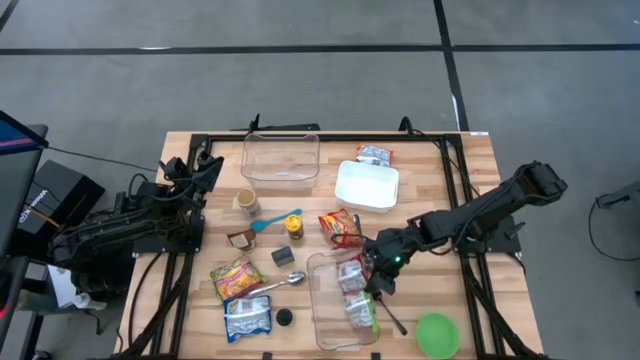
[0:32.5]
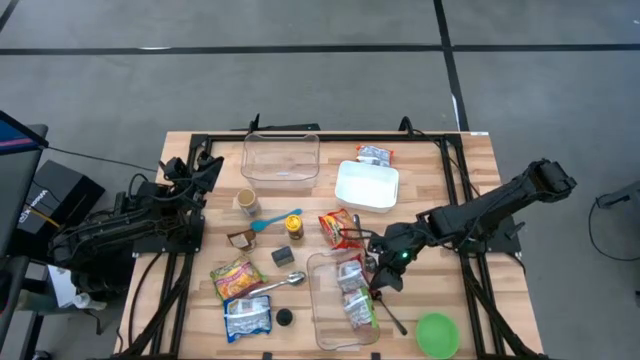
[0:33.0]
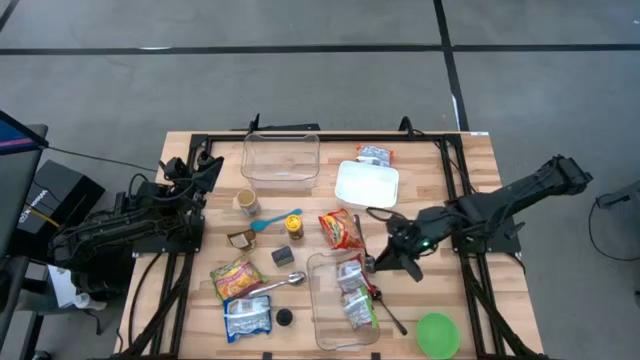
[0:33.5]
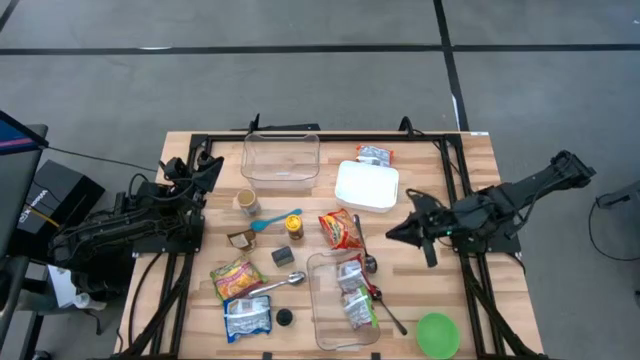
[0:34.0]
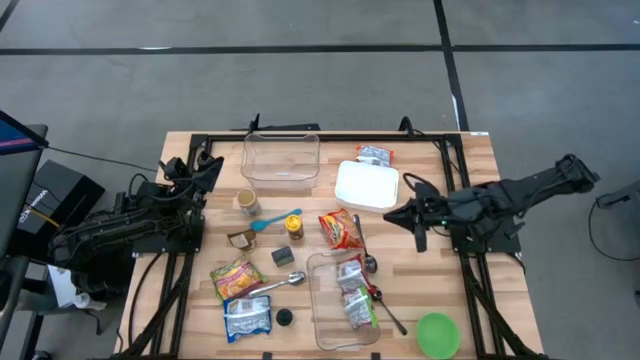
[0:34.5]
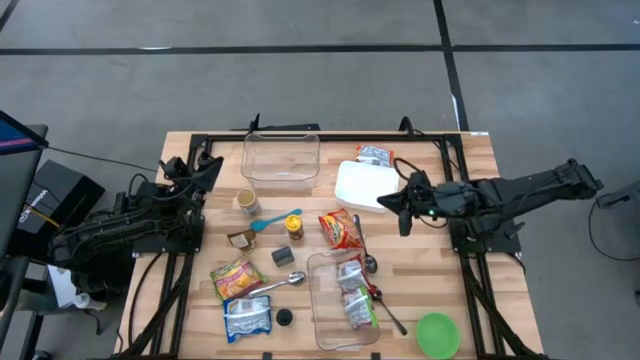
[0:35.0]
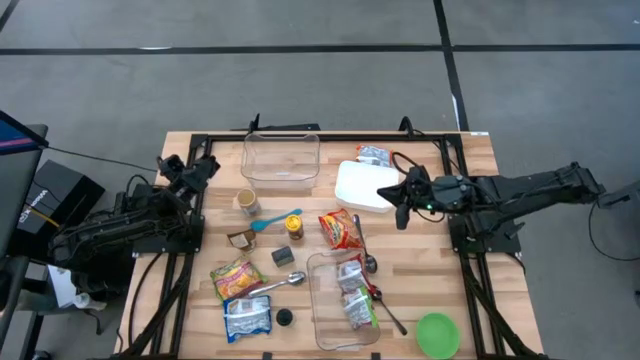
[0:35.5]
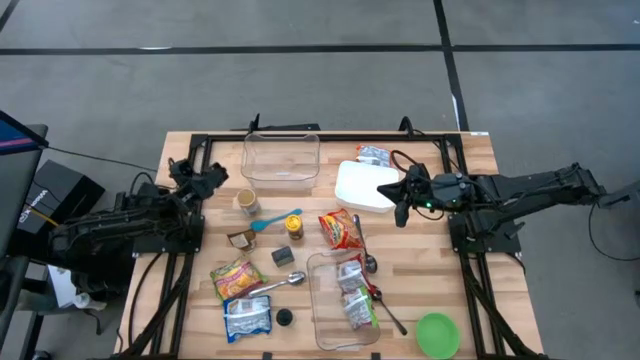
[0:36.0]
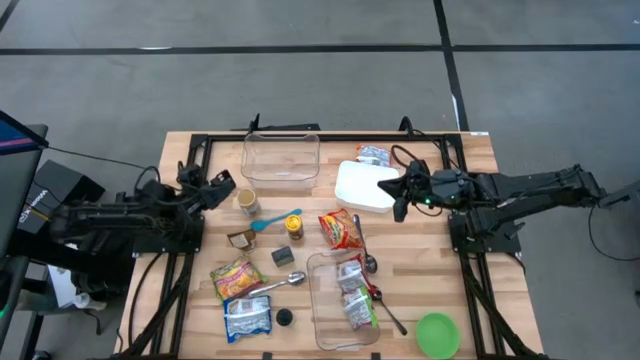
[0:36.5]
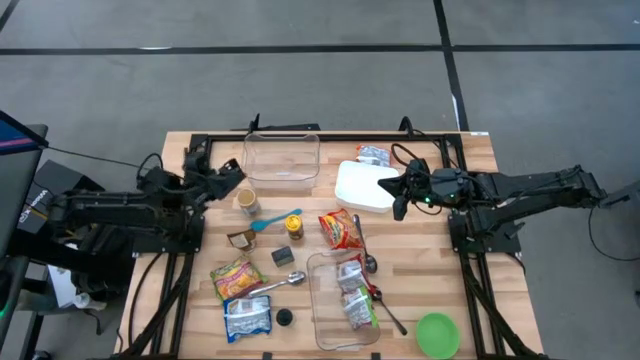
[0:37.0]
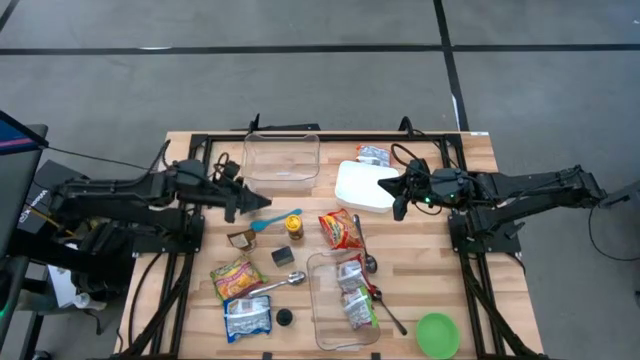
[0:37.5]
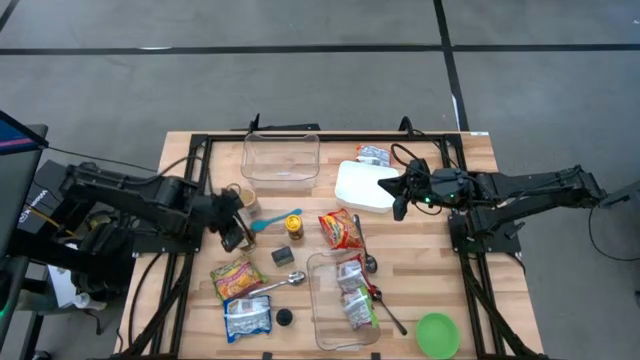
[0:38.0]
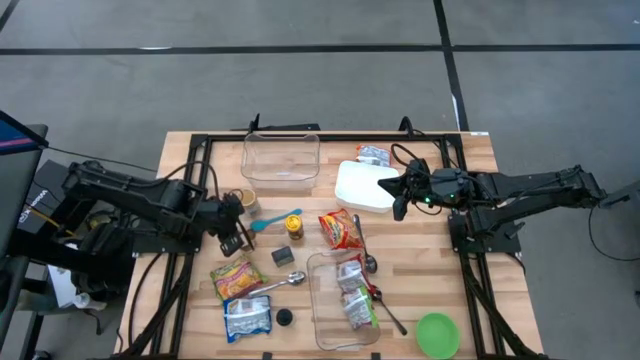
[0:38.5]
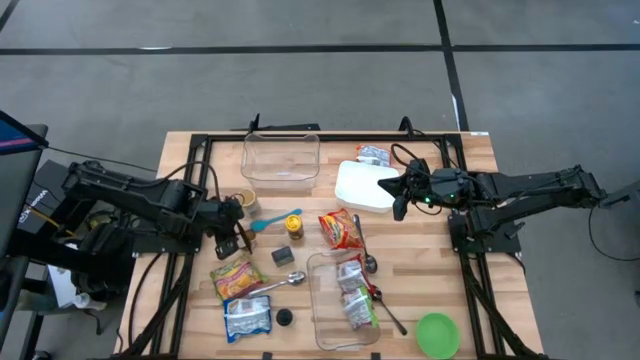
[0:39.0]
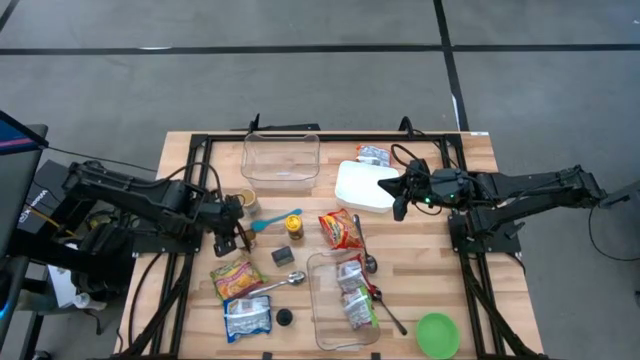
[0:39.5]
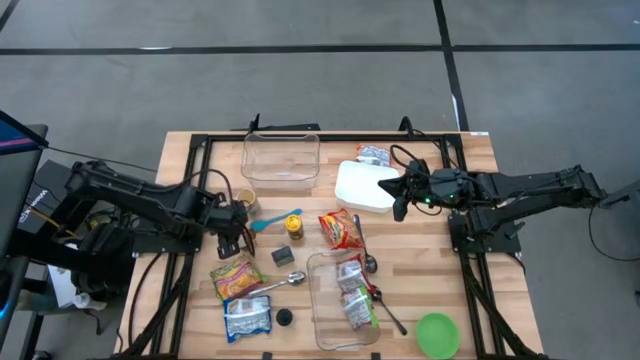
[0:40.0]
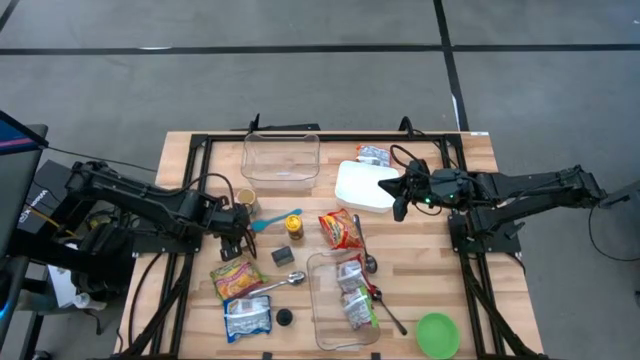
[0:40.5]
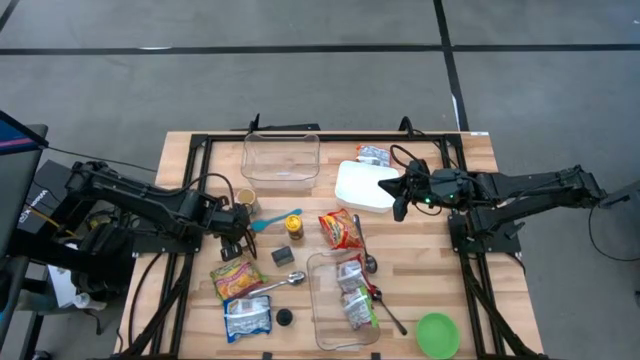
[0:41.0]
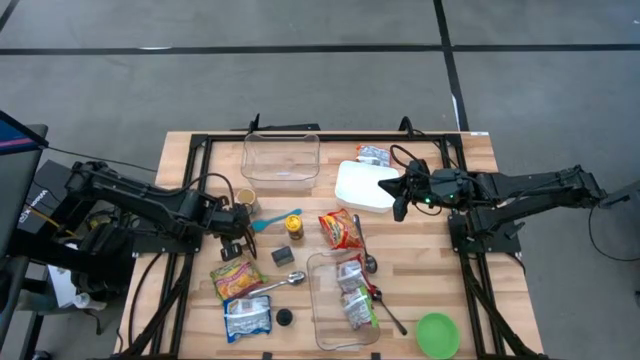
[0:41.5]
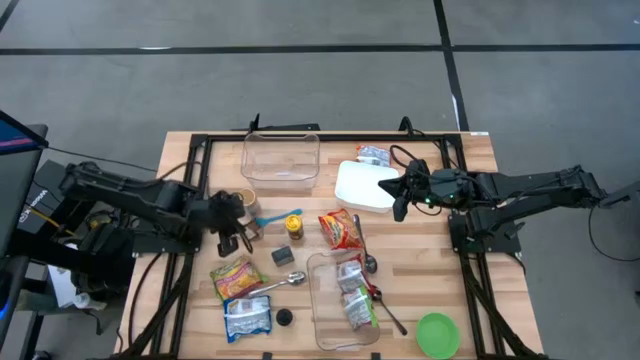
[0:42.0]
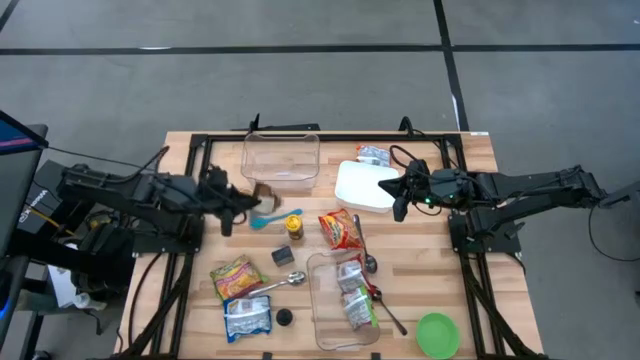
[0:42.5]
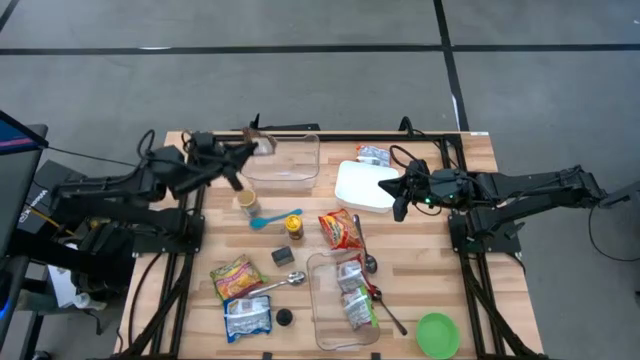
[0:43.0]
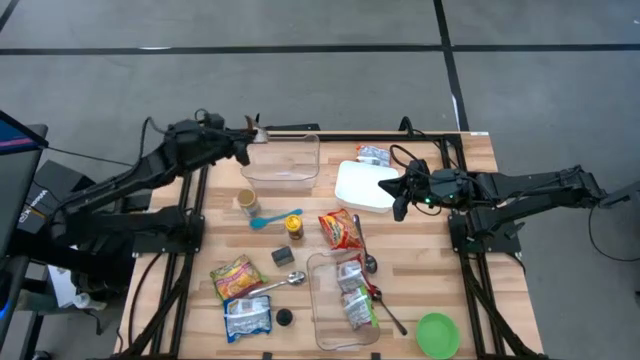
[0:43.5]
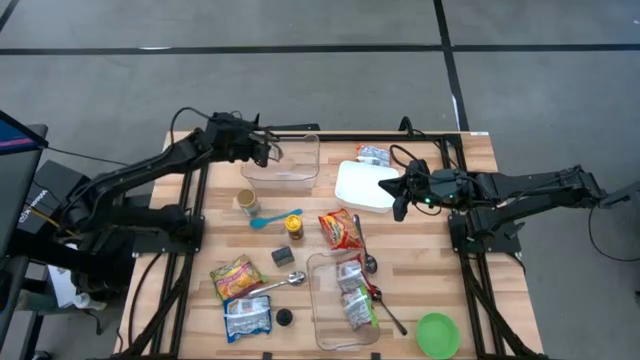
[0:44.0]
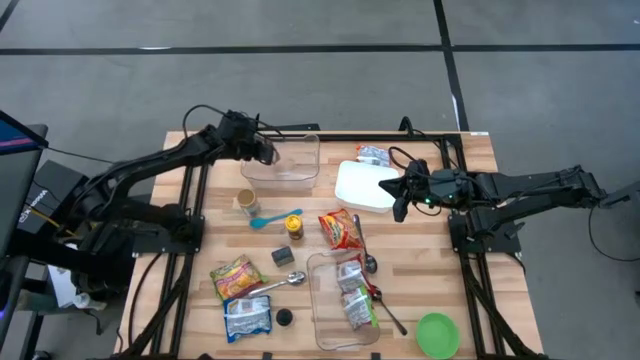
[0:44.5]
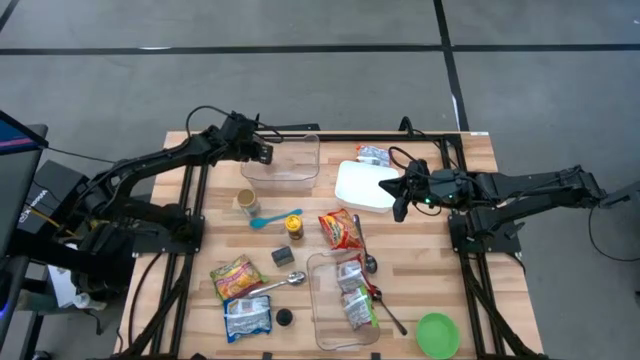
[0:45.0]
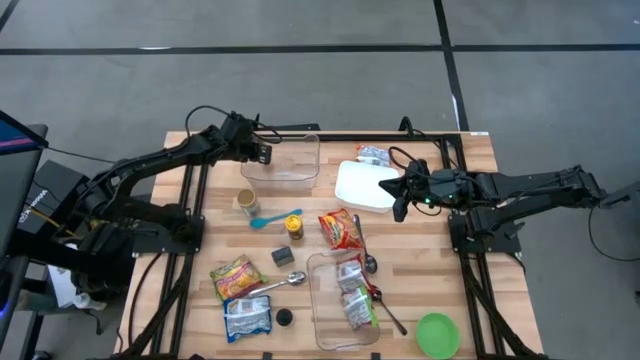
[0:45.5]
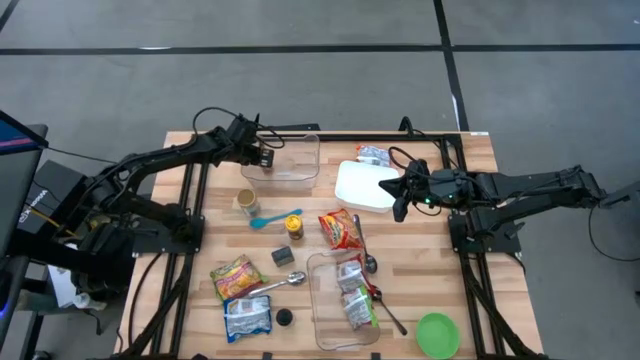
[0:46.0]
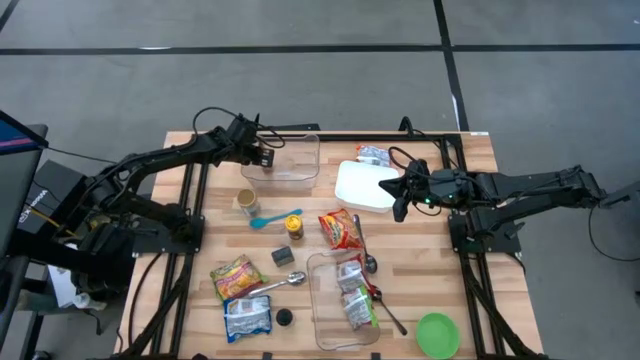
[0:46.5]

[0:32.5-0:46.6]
Task: Pick & Place Food Item
Put the orange seasoning pack into the top transparent bin

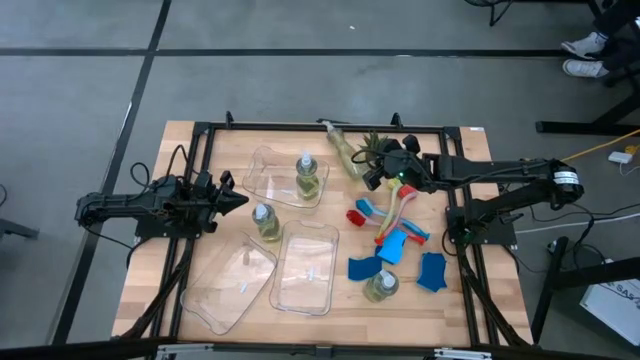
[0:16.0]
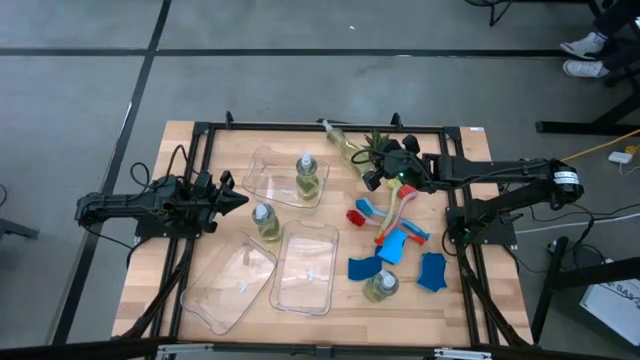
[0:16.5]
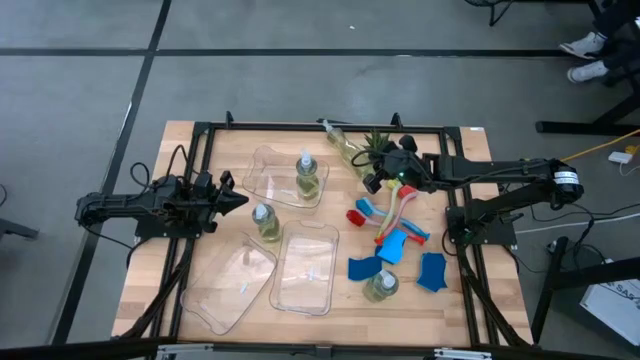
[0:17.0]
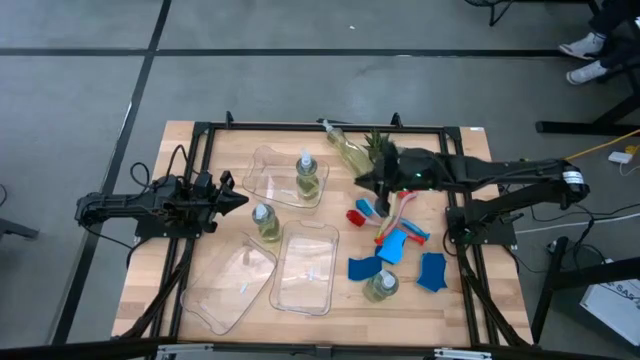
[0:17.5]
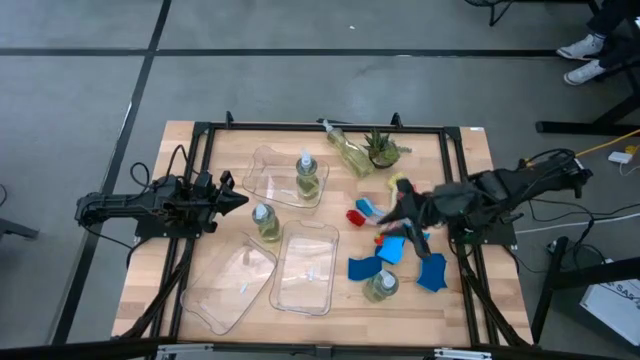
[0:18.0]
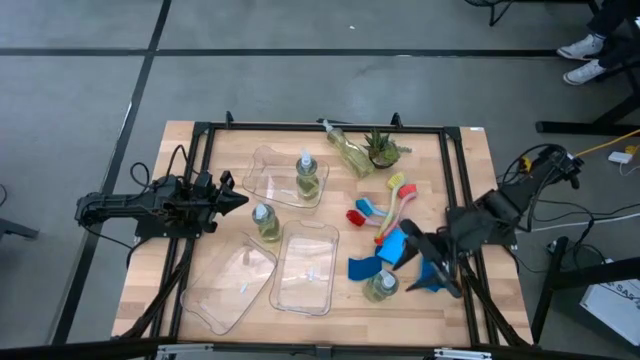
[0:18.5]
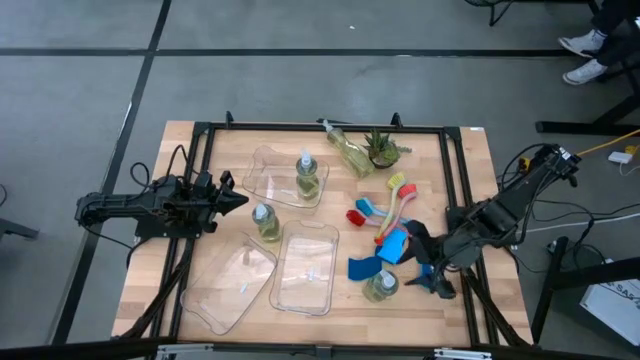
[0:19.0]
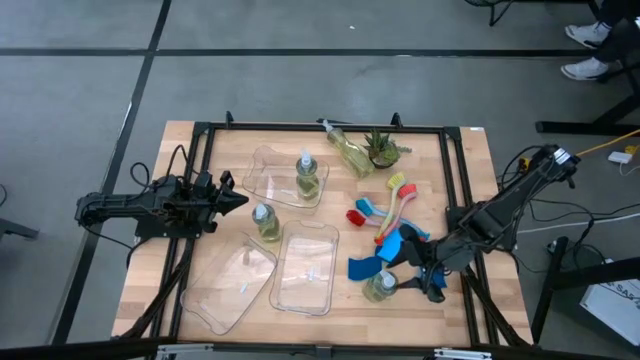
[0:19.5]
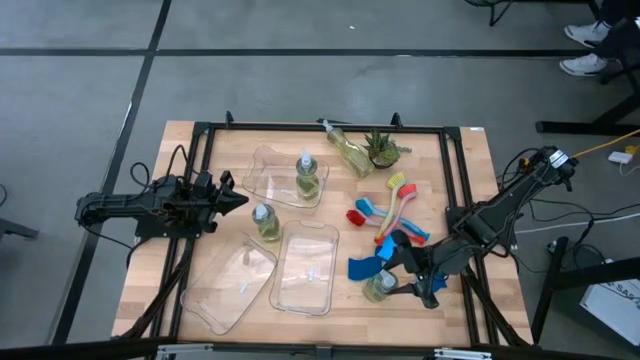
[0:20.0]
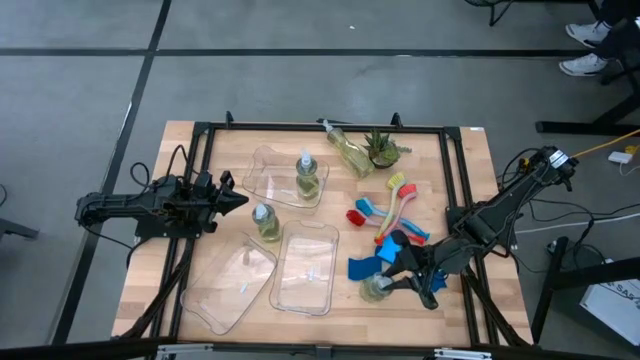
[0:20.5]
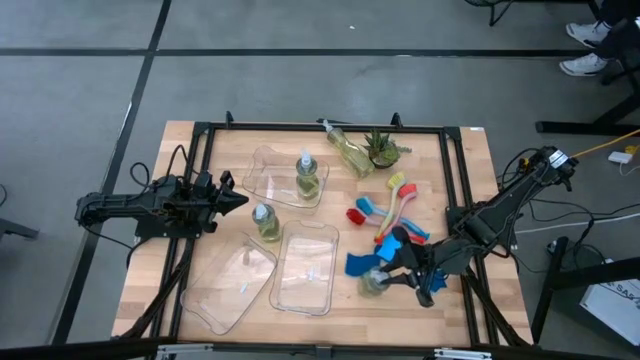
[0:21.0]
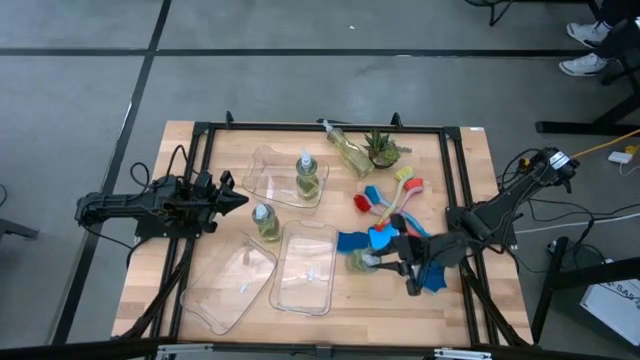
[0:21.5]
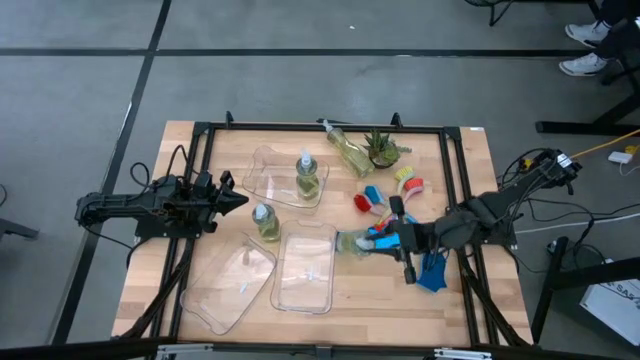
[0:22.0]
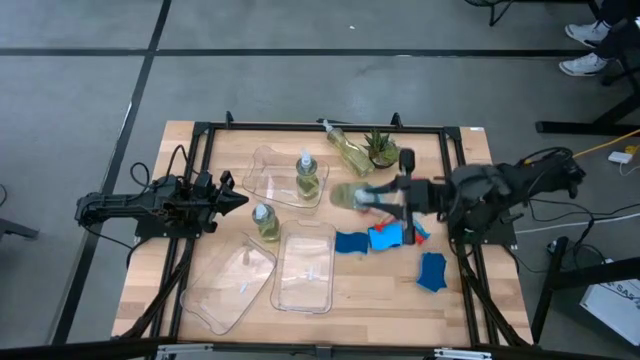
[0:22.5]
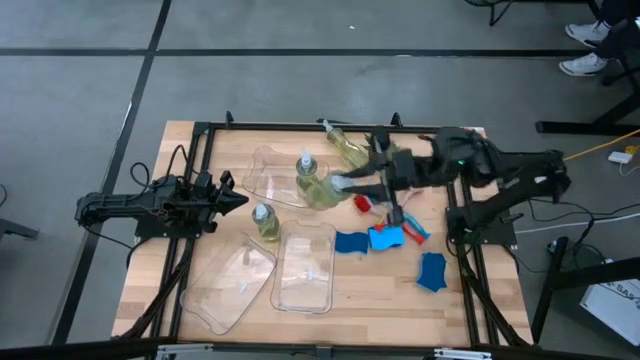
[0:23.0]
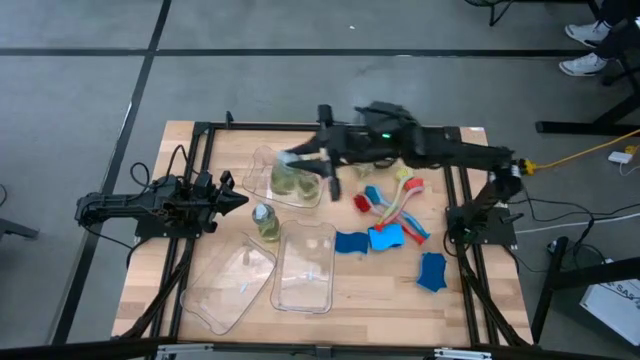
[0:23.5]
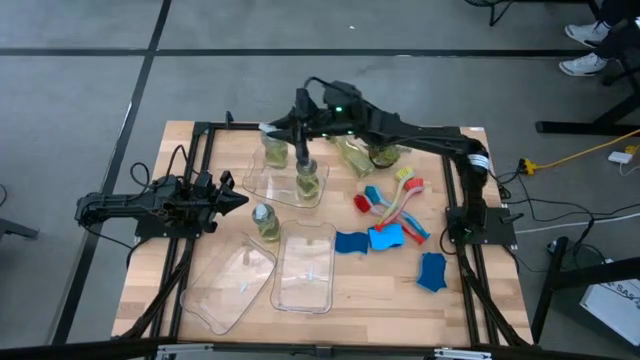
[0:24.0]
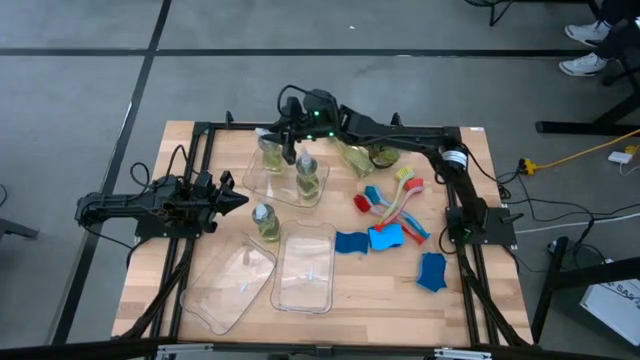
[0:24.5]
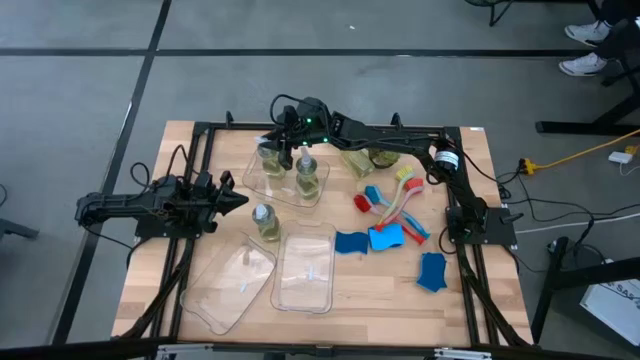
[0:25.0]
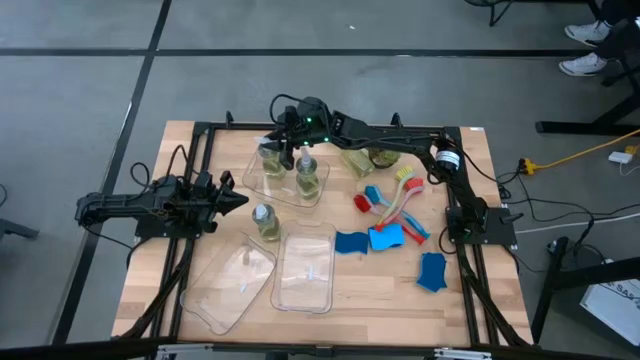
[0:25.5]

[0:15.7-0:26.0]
Task: Pick & Place Kitchen Sink Supplies
Put the green soap dispenser into the top transparent bin
